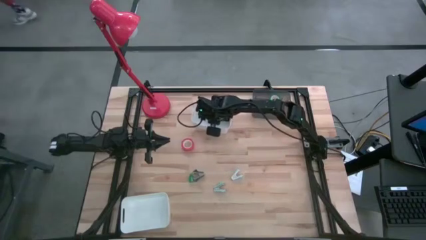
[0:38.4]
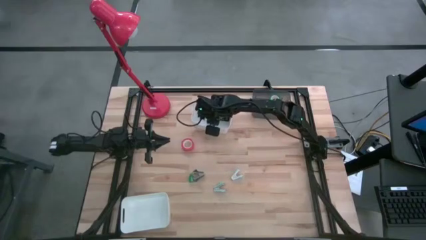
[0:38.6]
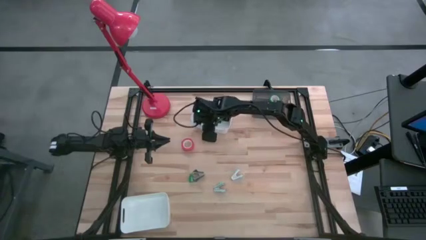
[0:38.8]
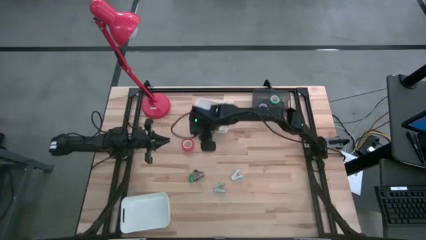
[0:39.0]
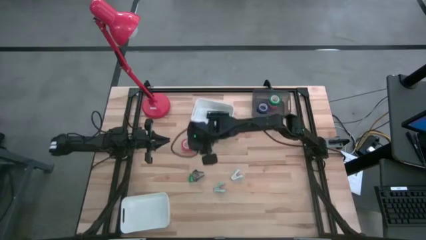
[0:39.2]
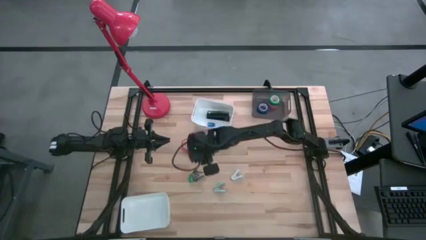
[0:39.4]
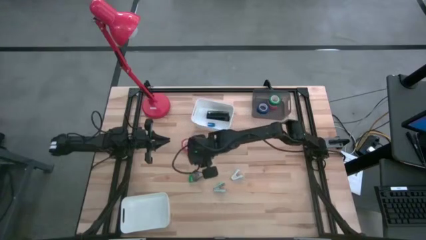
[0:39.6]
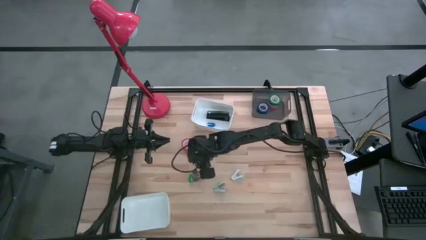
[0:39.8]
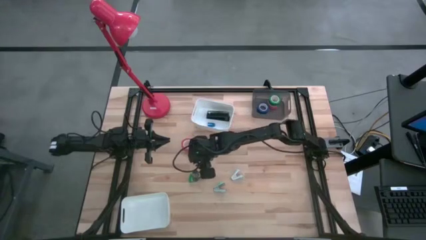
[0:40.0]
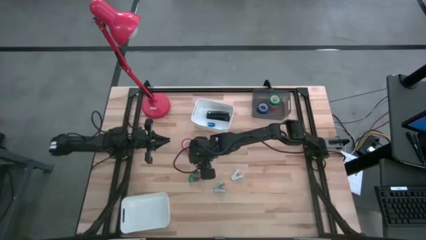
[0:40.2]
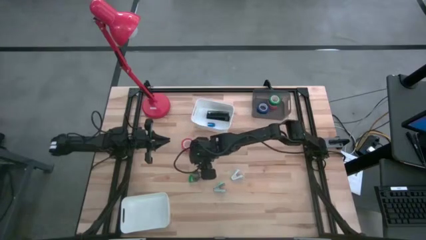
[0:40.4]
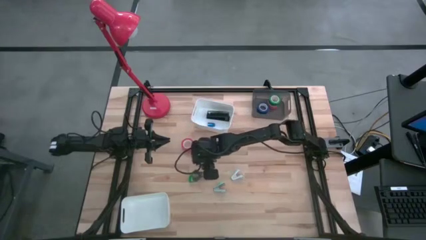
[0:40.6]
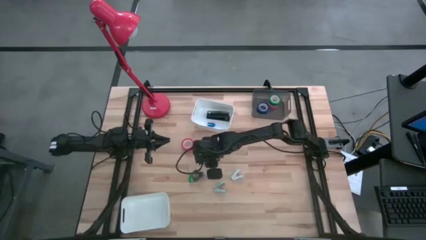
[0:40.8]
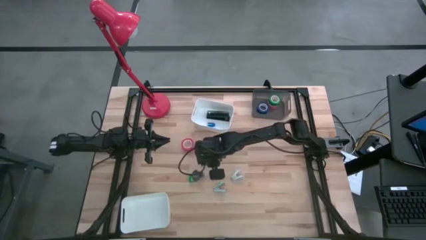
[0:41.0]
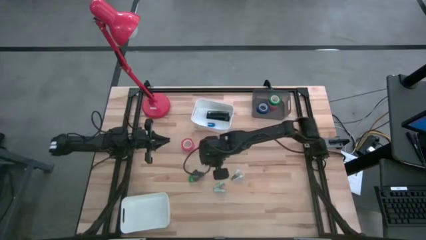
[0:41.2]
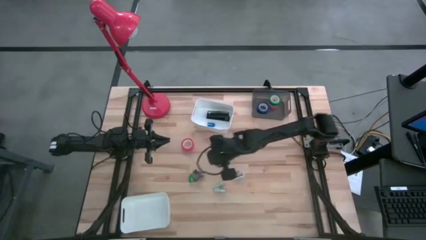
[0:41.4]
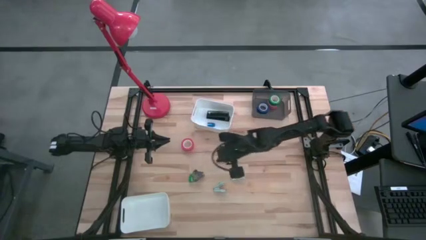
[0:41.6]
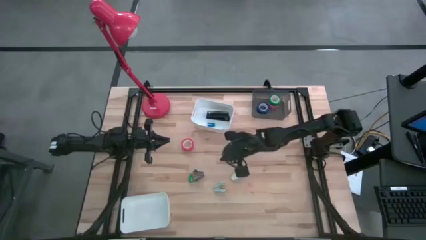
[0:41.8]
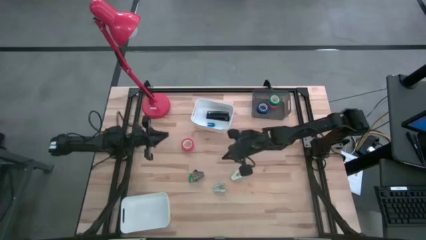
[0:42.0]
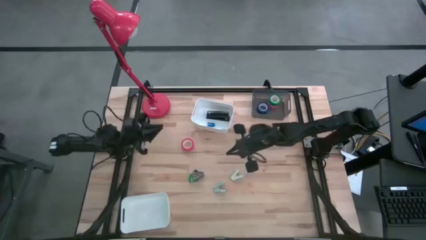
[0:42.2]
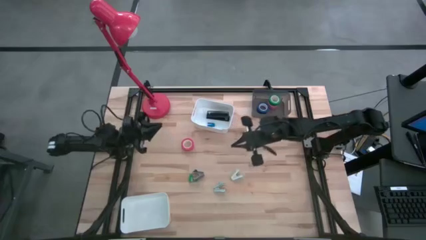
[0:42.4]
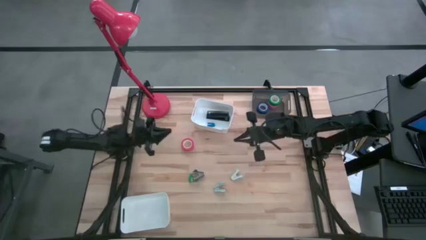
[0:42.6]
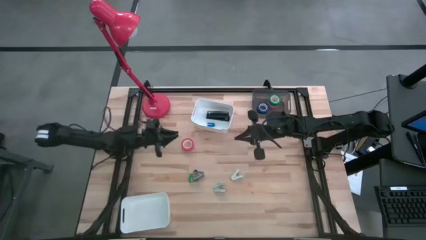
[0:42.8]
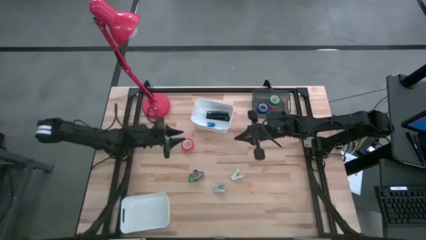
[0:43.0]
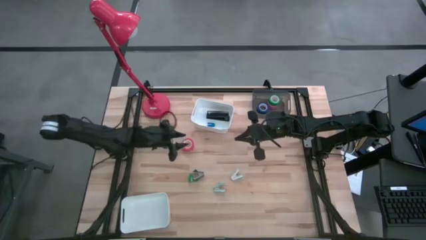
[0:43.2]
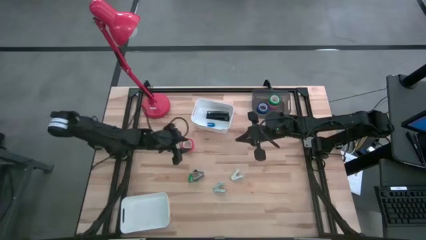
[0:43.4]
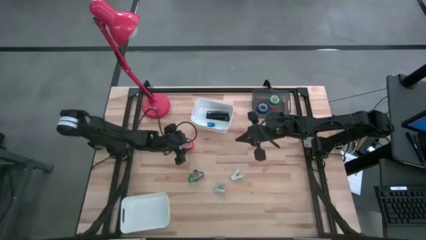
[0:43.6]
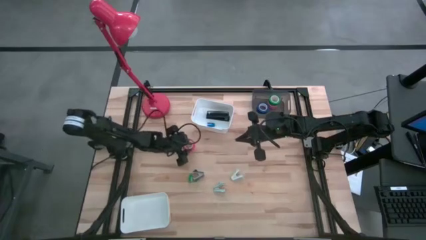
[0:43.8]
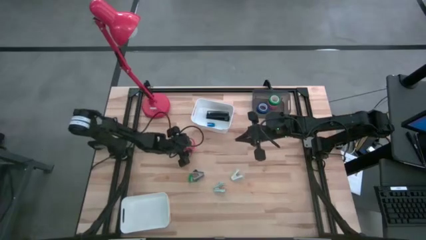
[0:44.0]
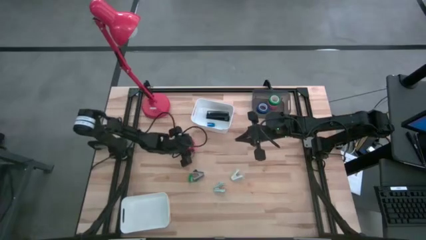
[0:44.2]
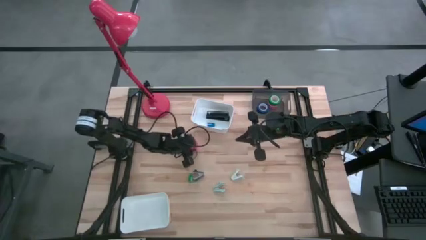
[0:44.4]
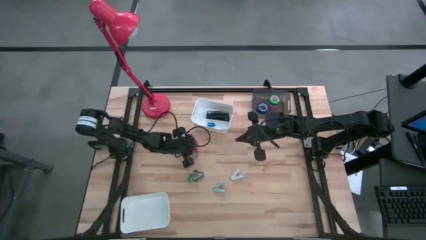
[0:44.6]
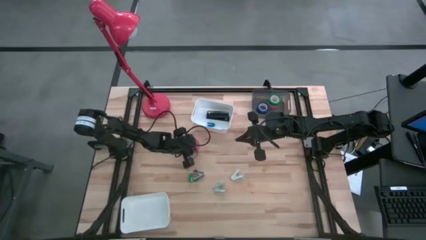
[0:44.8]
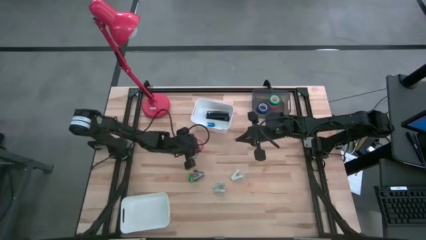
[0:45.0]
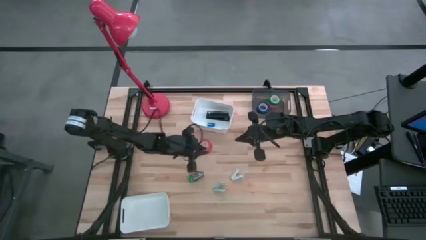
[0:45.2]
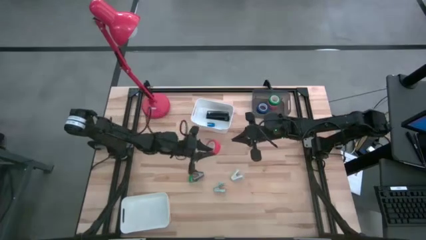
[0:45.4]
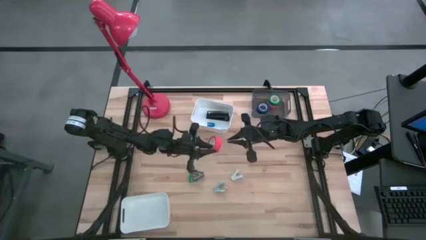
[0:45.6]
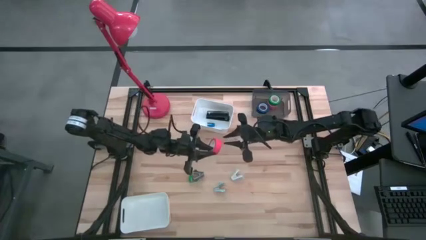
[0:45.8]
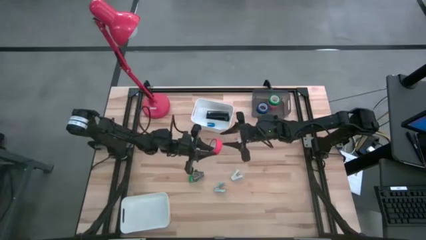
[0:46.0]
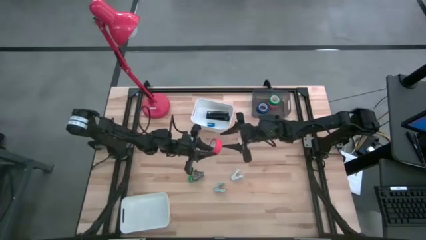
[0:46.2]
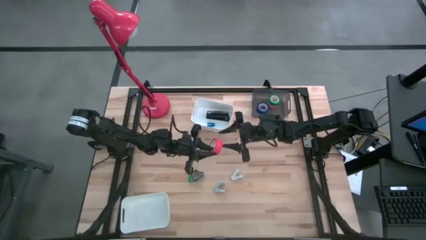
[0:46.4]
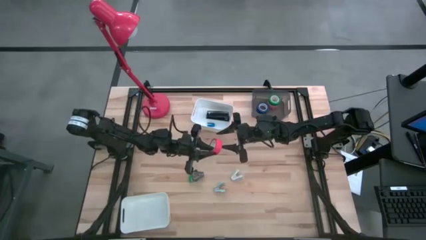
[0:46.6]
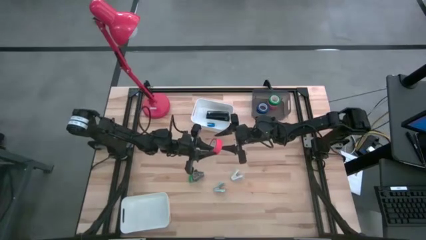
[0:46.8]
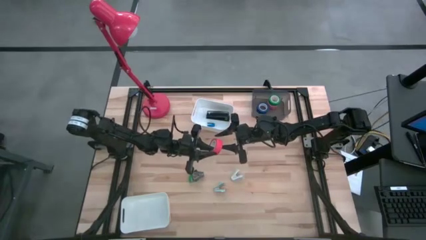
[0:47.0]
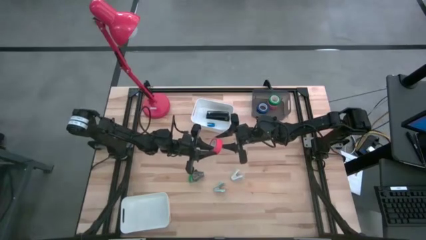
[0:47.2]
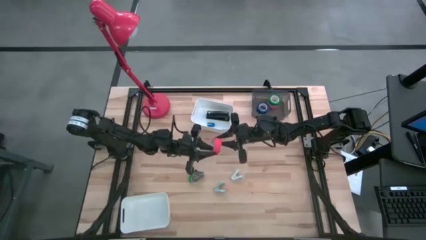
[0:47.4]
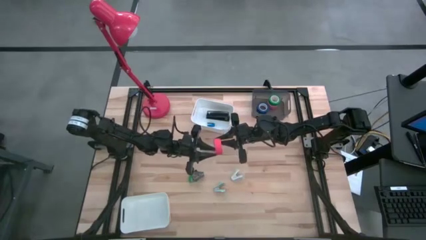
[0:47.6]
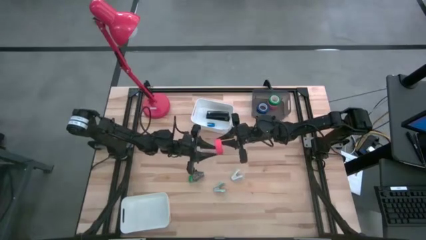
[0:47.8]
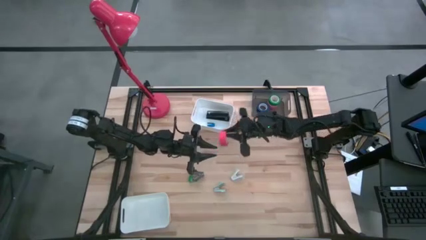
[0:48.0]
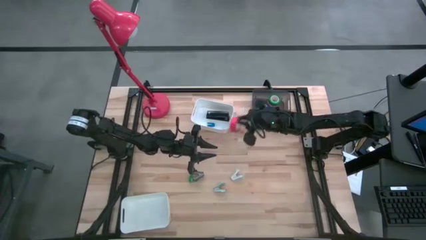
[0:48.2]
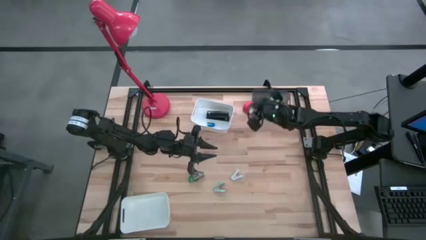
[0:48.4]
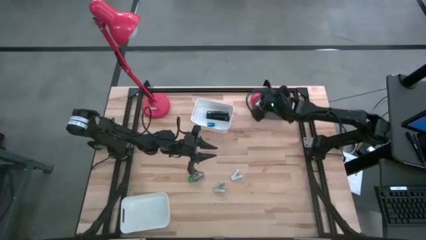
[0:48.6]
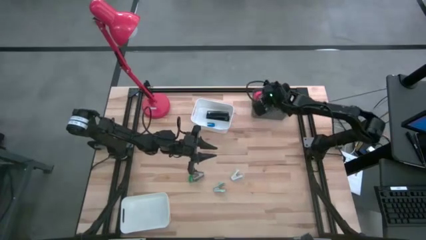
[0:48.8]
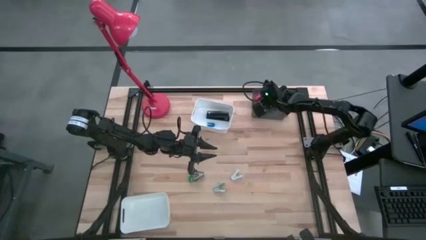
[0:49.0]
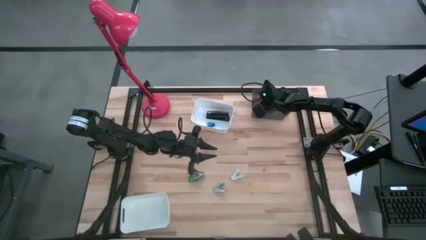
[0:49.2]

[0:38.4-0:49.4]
Task: Pick and place Stapler, Stapler remover, tape
Put the orange tape into the gray bin

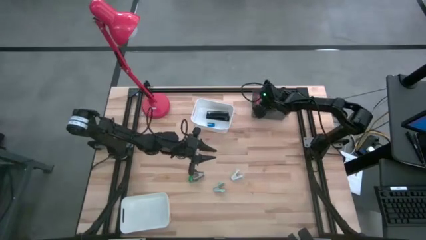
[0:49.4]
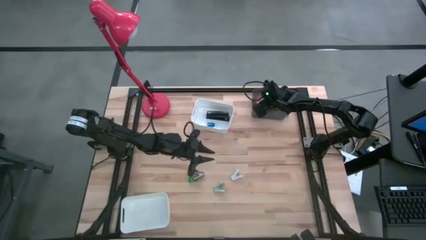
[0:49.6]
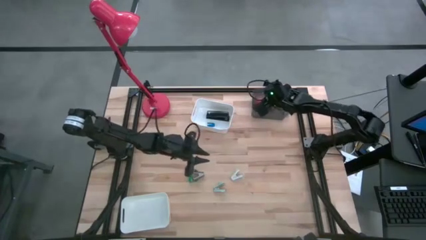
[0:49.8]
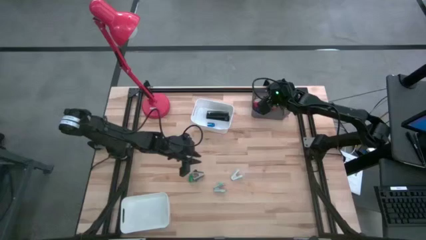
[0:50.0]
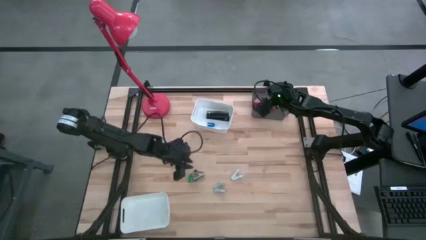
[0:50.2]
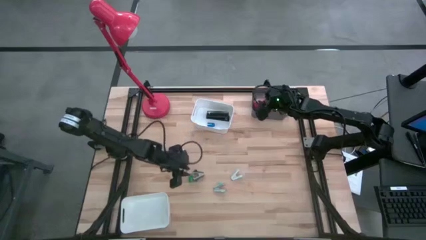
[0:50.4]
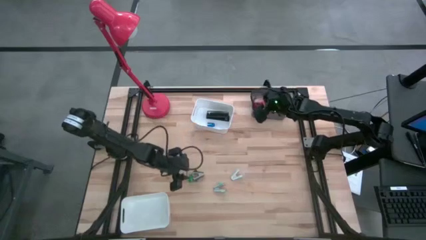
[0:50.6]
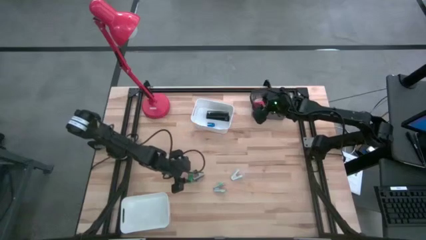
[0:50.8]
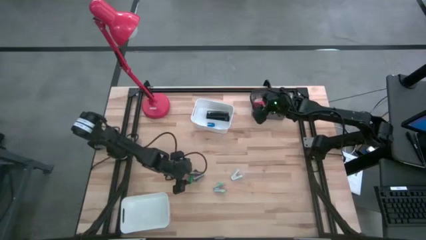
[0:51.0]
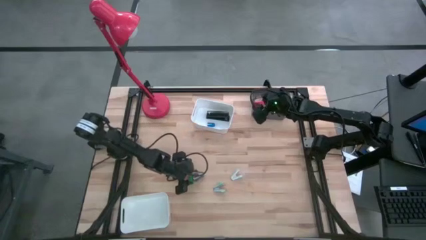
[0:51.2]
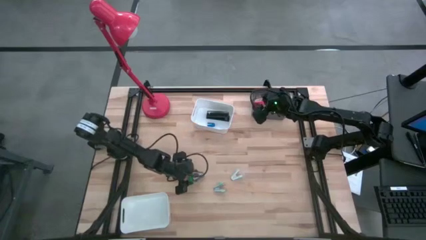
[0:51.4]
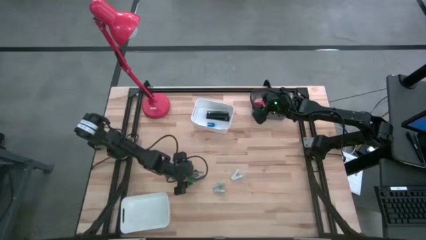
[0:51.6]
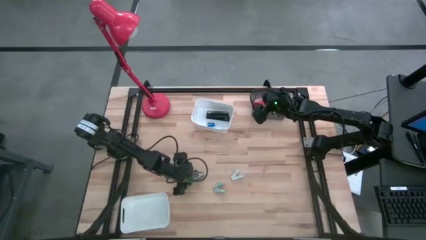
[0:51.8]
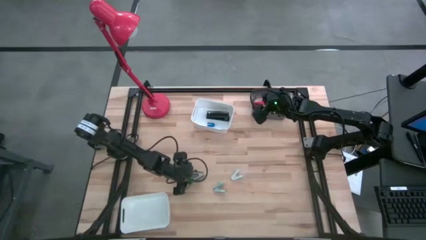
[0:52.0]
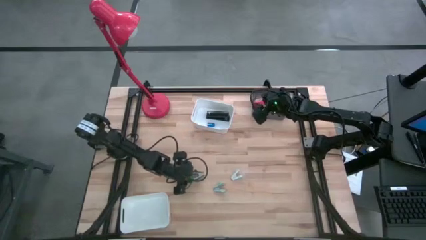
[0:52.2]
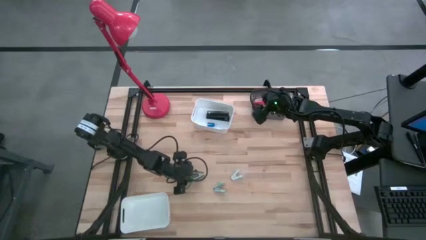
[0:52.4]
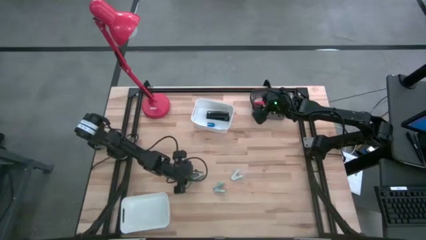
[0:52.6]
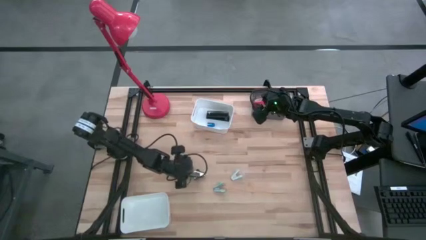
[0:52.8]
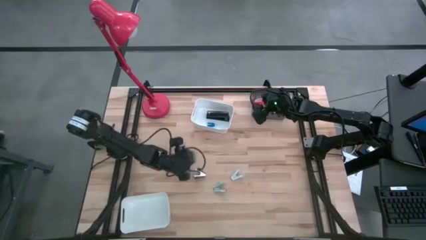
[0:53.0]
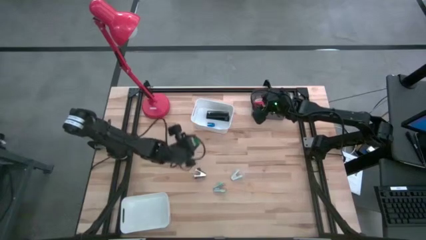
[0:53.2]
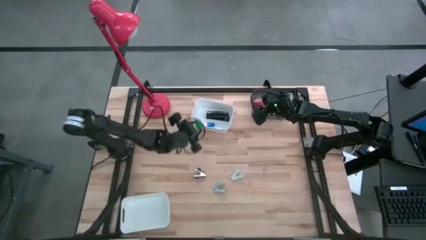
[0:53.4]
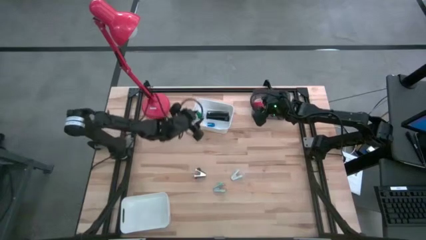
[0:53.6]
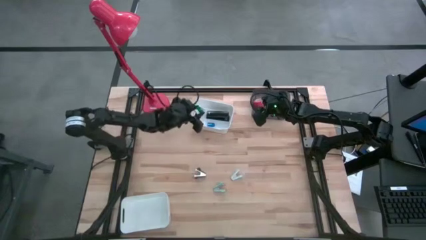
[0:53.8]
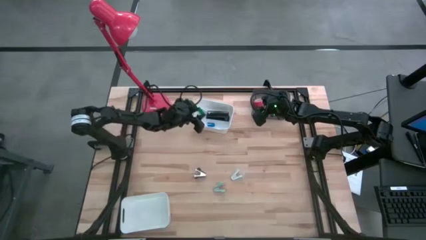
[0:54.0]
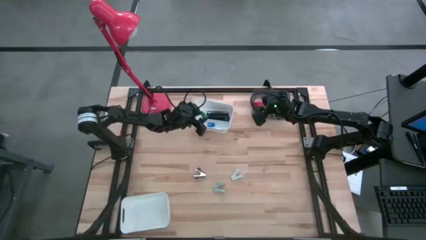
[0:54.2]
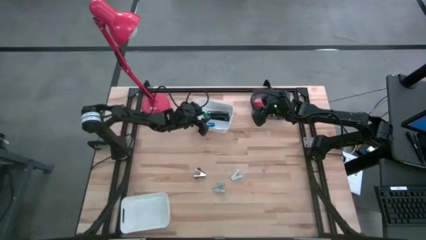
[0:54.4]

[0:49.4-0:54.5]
Put the green stapler into the top white bin
